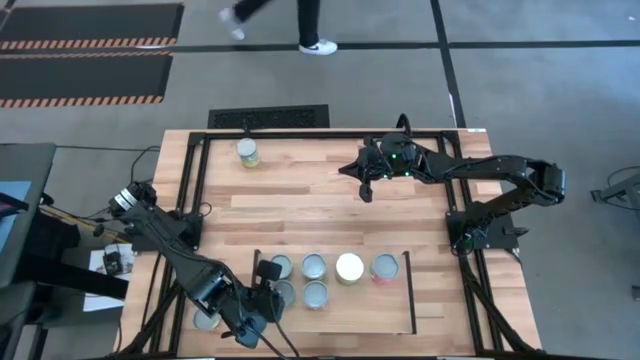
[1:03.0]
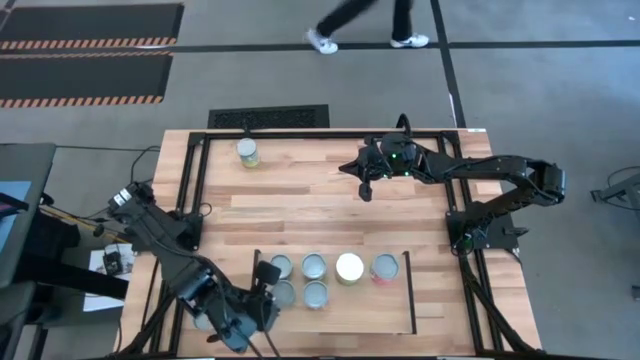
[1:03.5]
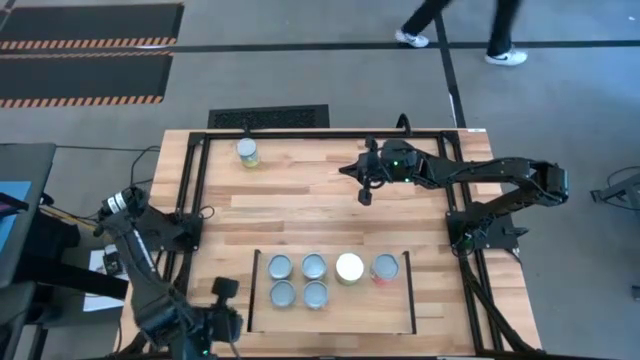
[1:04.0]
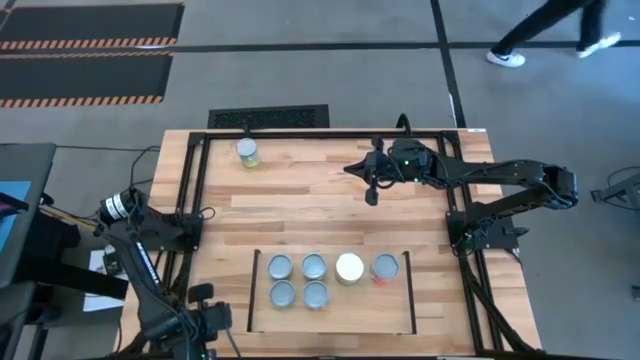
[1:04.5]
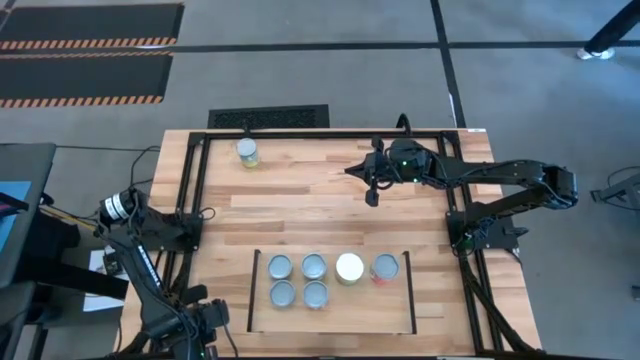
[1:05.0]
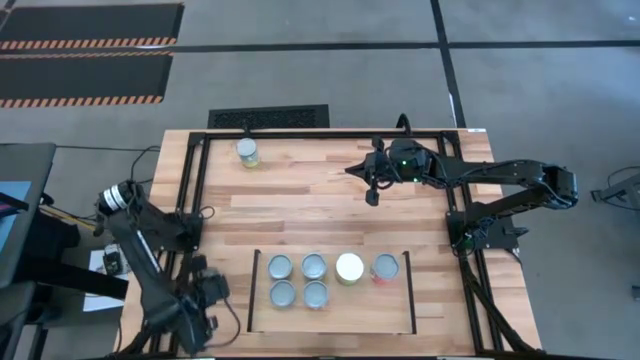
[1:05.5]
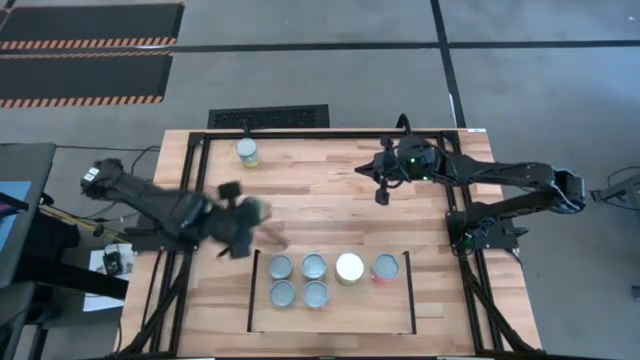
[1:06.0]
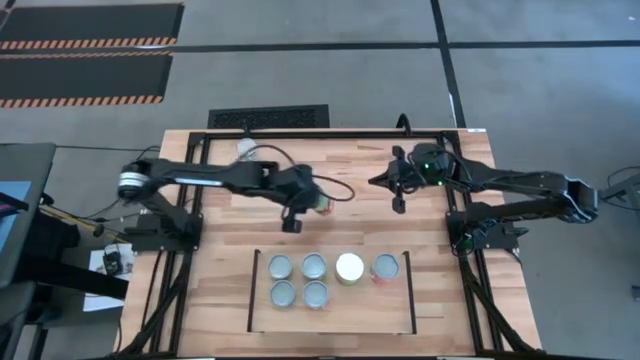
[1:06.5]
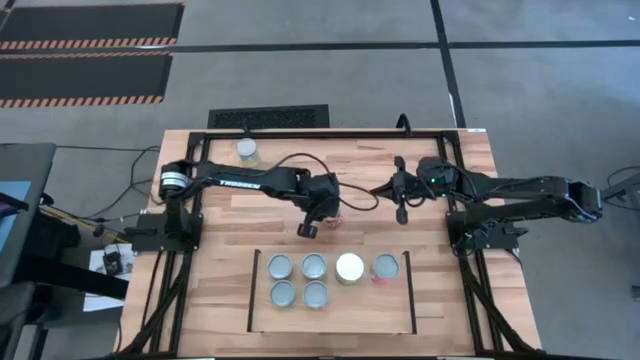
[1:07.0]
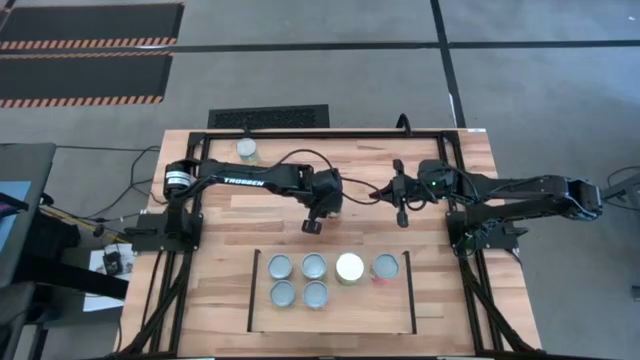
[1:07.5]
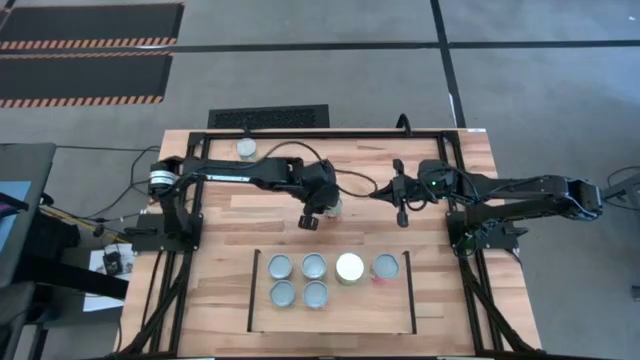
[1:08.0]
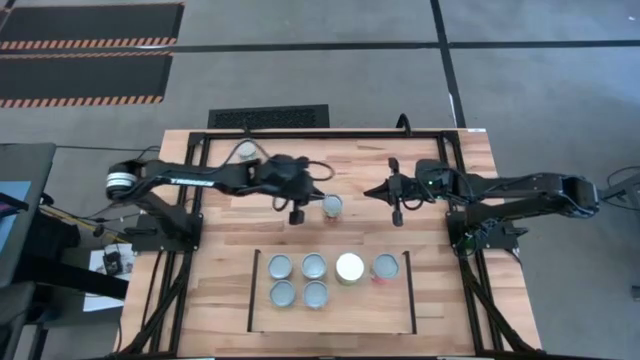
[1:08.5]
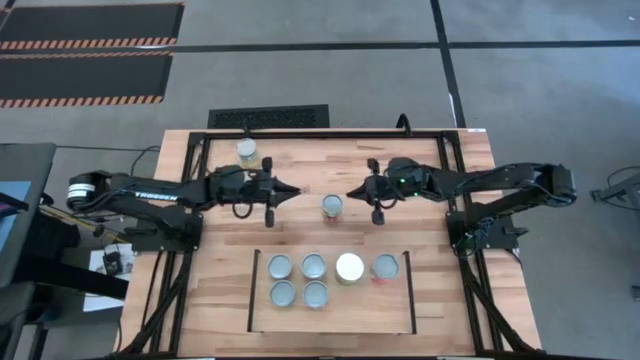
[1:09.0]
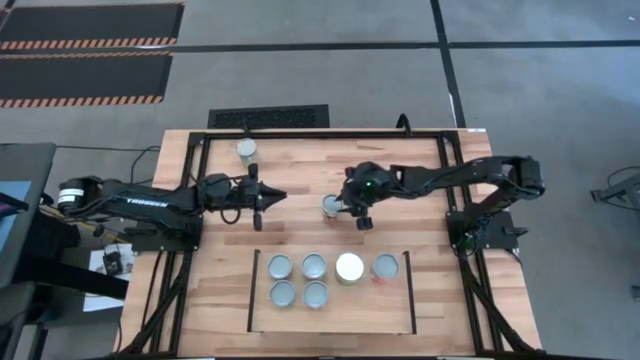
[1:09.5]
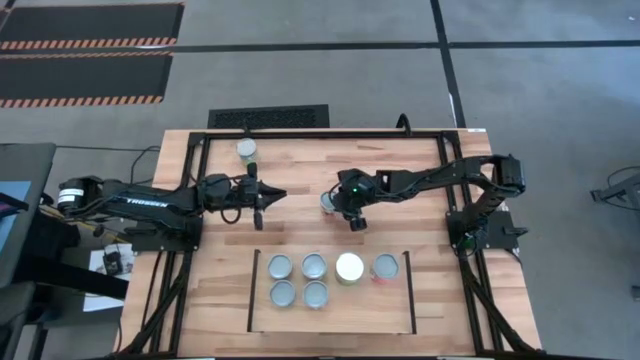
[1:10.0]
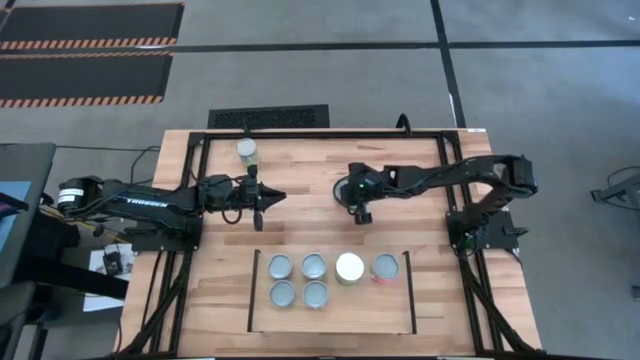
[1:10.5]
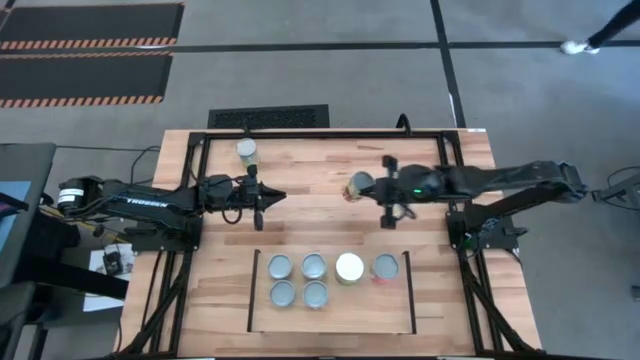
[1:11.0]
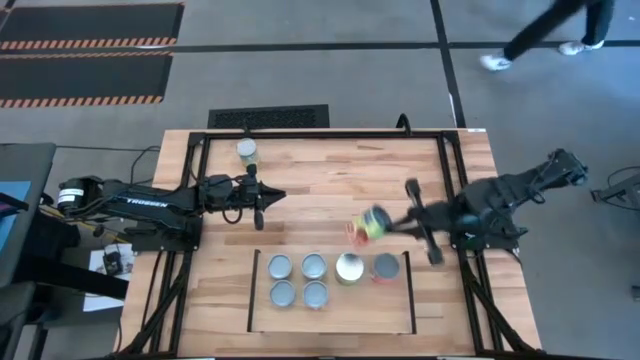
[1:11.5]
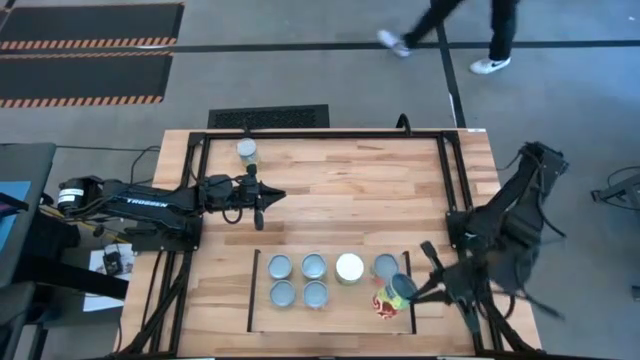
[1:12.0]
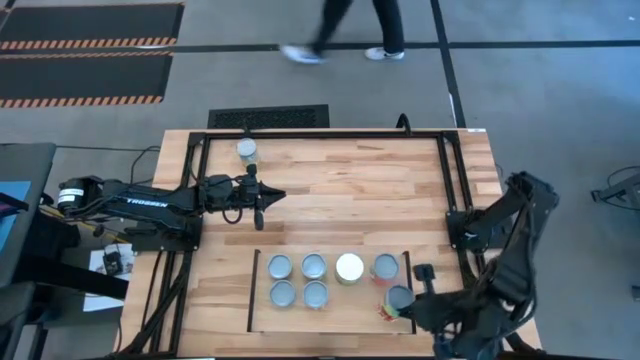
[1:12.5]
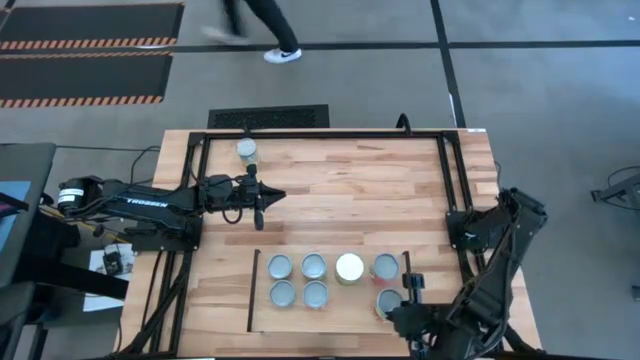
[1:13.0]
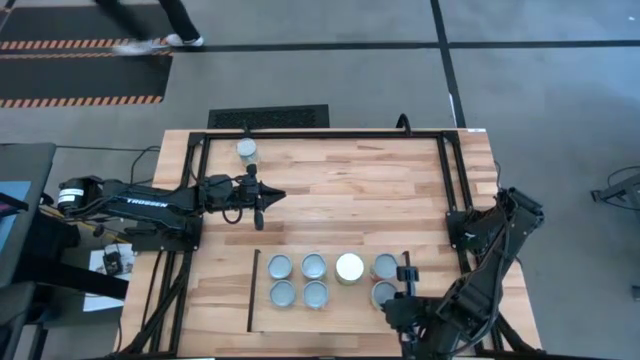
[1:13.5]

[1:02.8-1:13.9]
Task: Pick and place cans onto a shelf
Put the red green can on the shelf aligned with other cans on the shelf

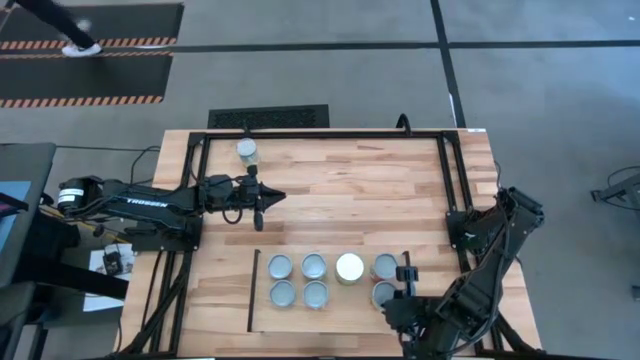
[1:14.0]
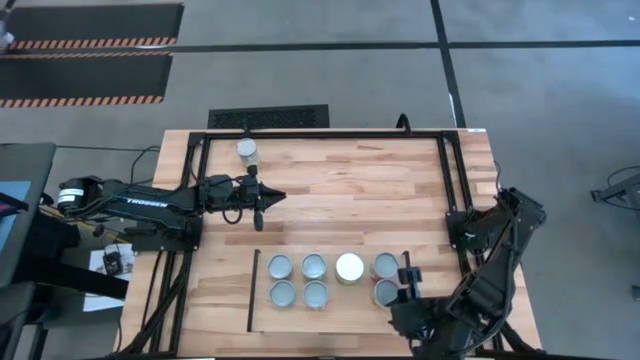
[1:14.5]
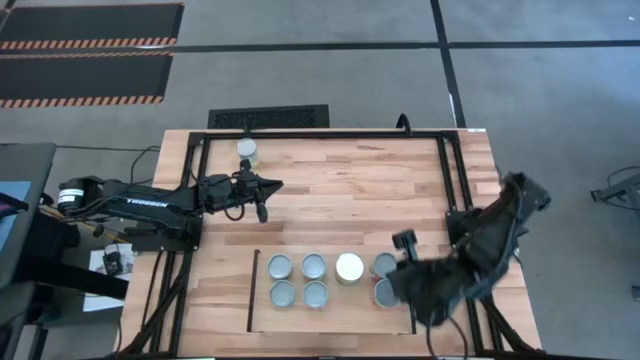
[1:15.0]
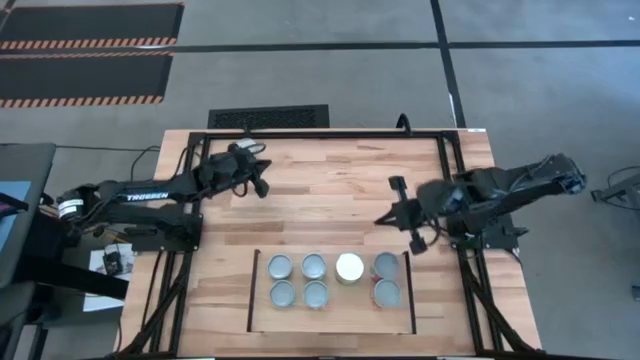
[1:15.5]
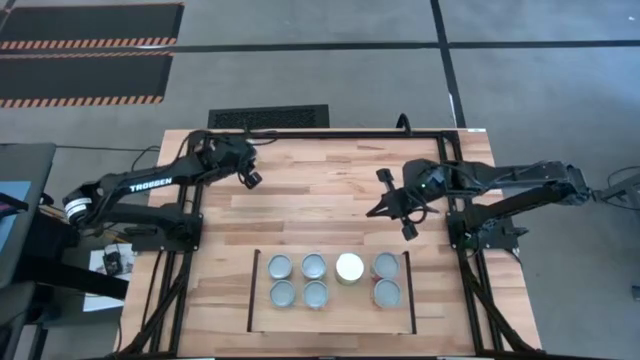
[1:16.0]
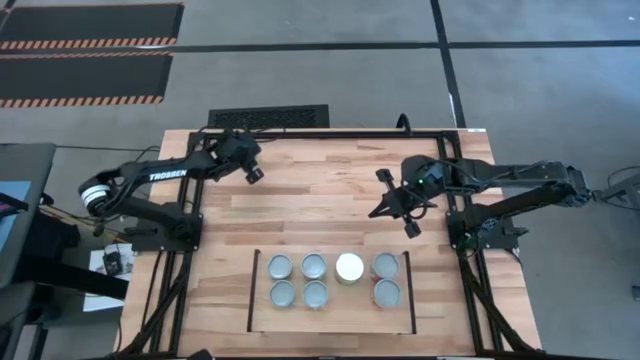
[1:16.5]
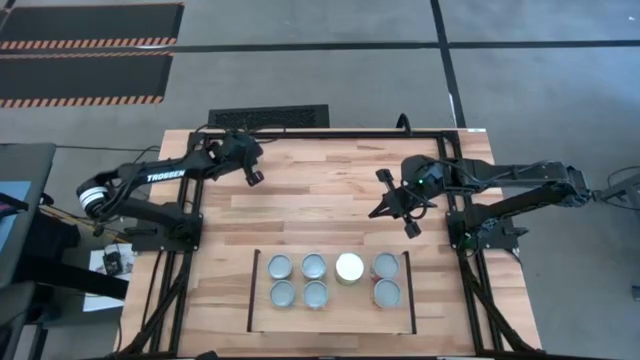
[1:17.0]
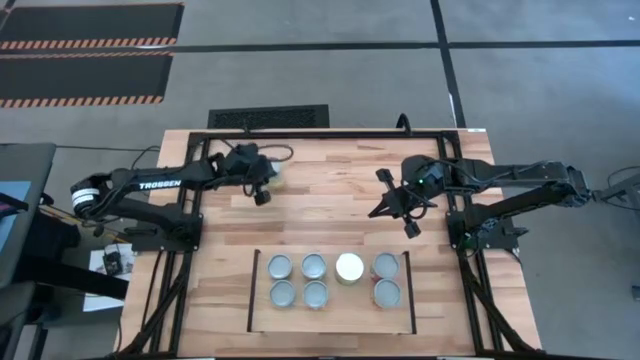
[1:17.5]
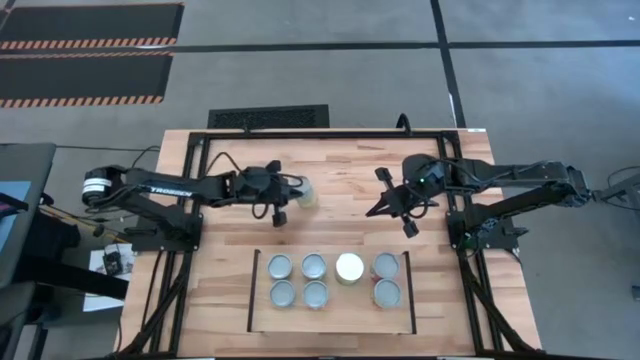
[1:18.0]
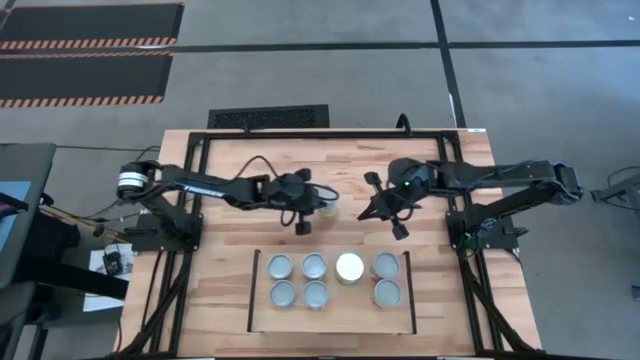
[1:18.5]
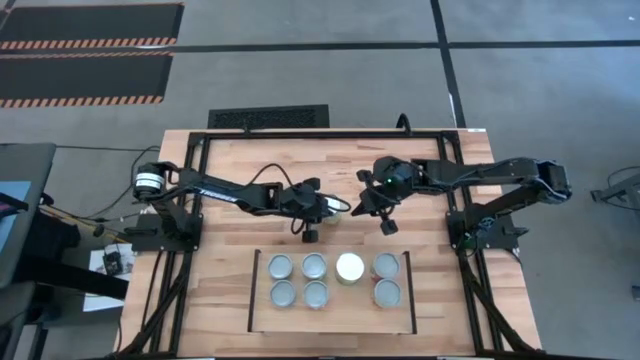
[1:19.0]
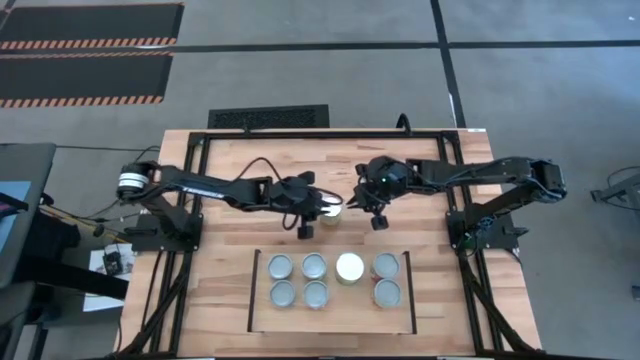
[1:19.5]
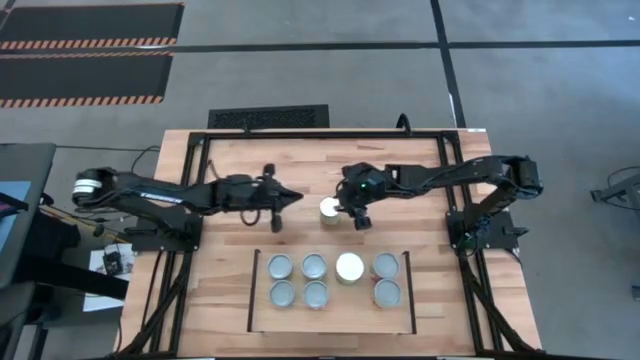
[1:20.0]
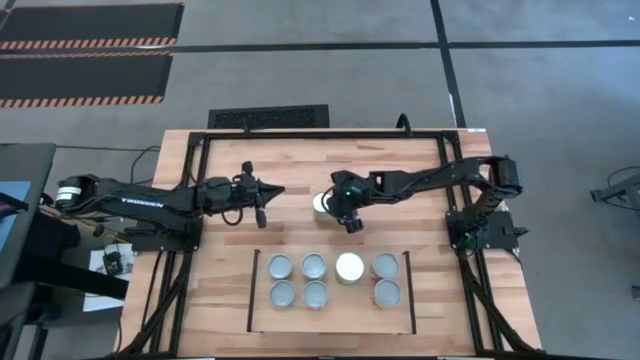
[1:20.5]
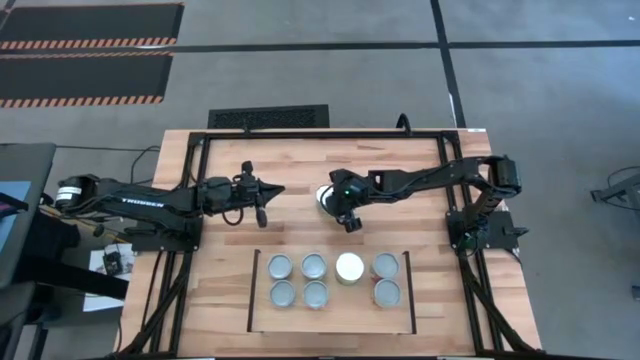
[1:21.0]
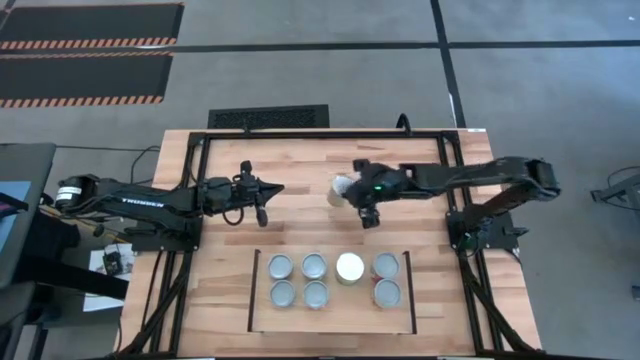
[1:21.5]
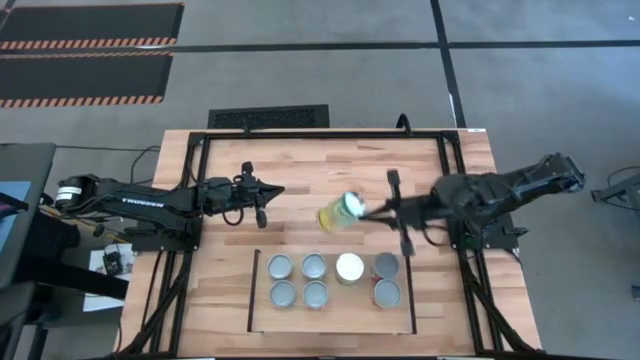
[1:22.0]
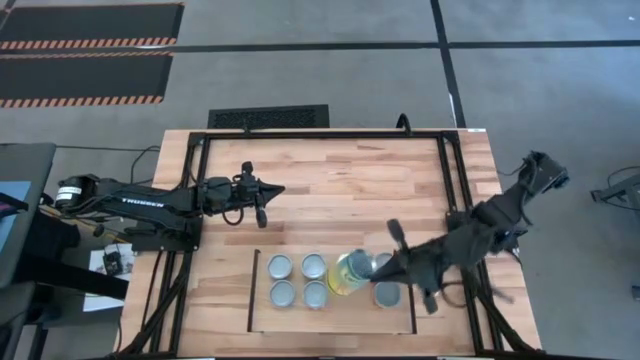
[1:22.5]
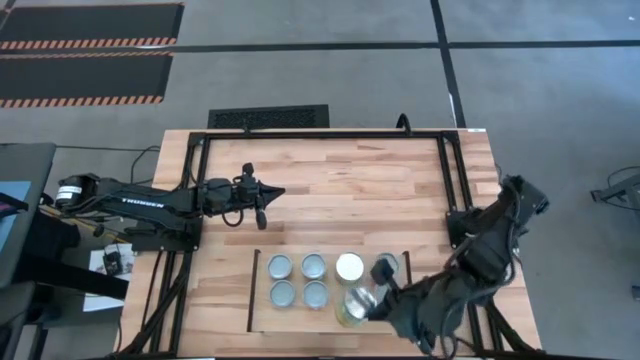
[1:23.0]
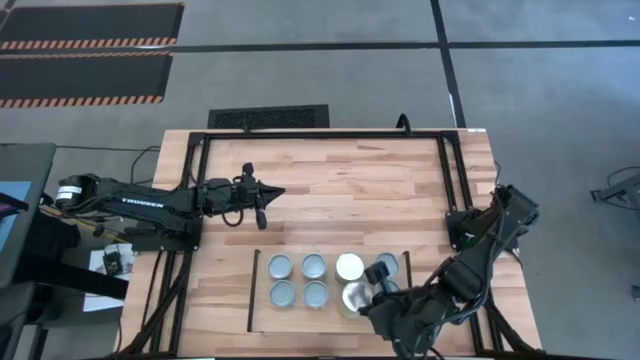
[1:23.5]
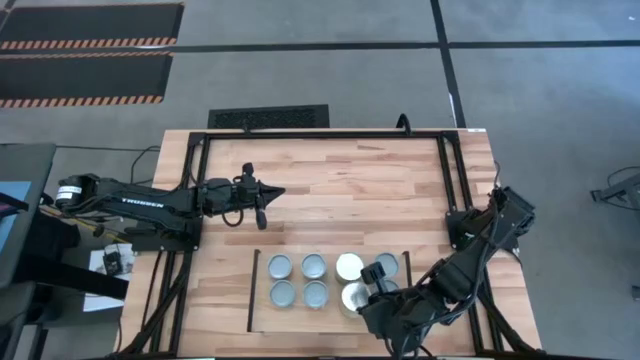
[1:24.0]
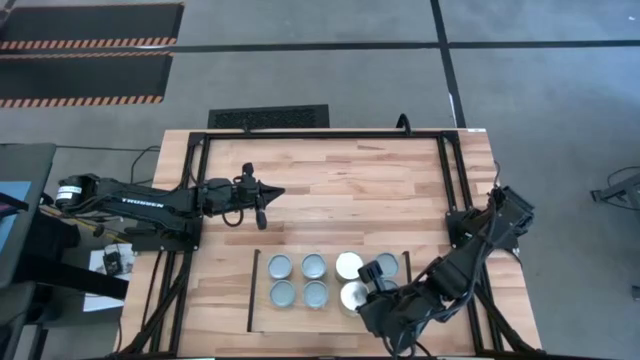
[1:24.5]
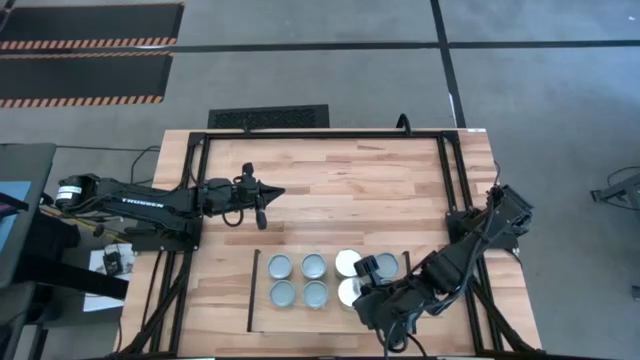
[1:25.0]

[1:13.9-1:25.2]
Put the green carrot can on the shelf aligned with other cans on the shelf
